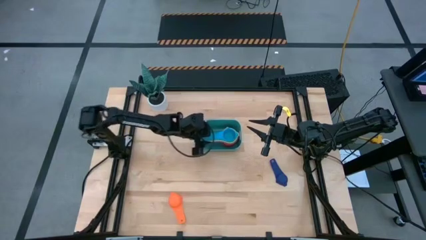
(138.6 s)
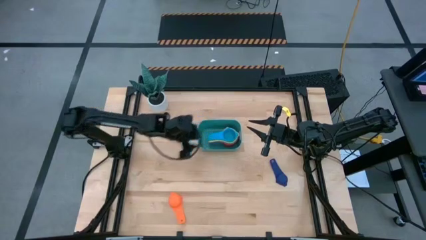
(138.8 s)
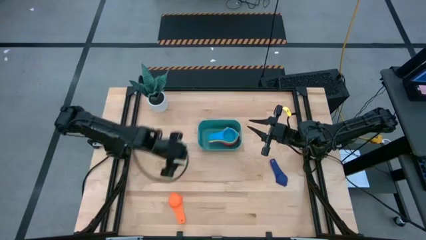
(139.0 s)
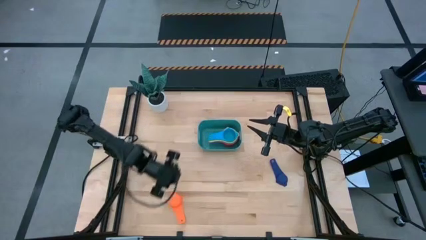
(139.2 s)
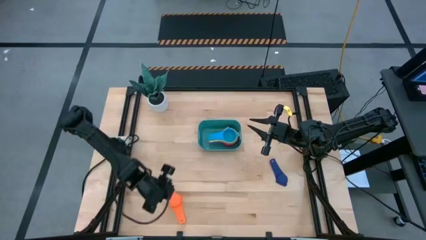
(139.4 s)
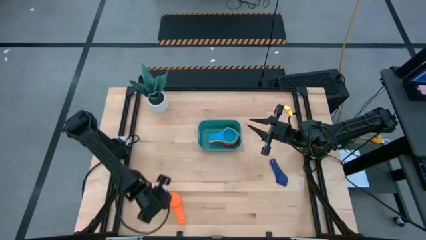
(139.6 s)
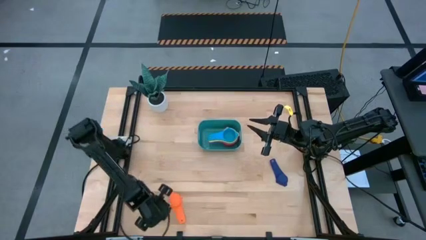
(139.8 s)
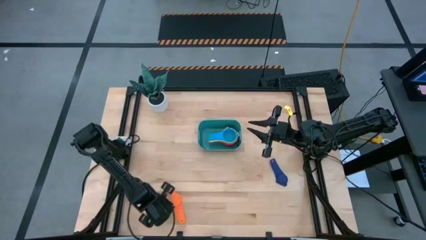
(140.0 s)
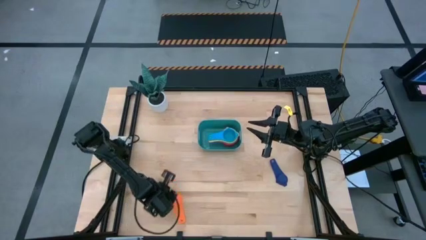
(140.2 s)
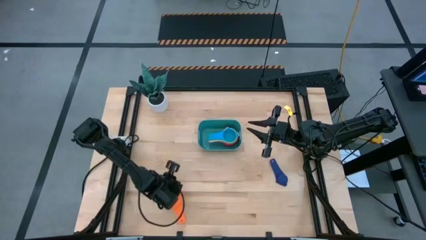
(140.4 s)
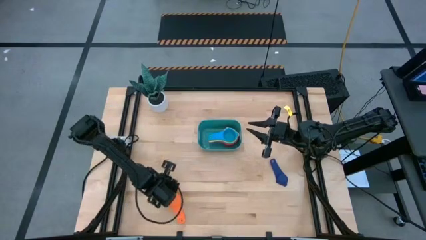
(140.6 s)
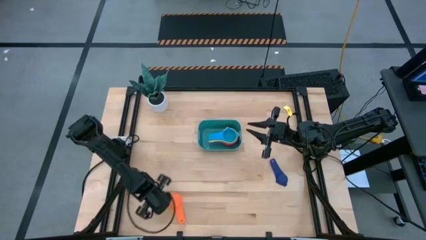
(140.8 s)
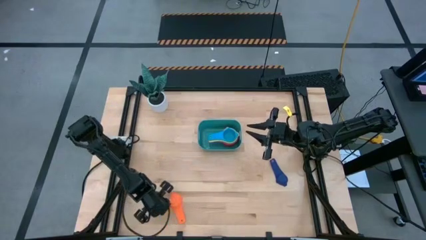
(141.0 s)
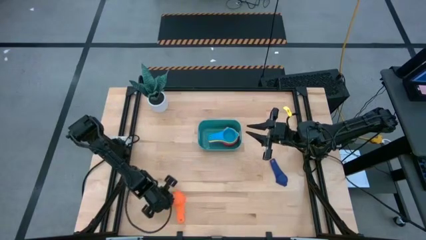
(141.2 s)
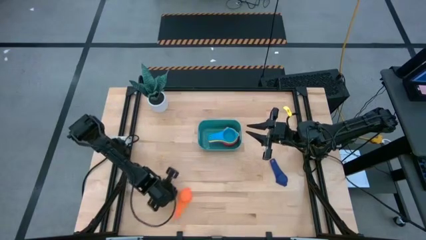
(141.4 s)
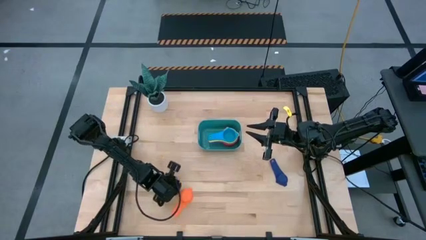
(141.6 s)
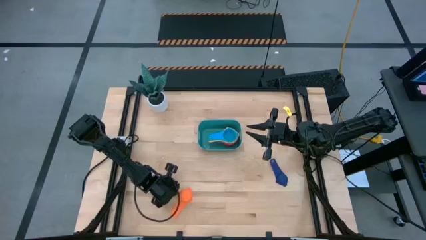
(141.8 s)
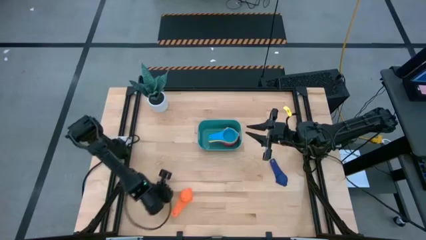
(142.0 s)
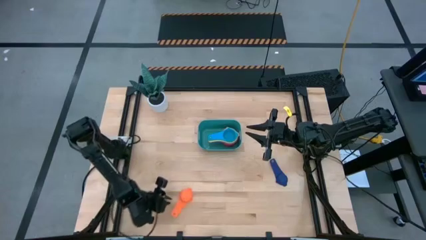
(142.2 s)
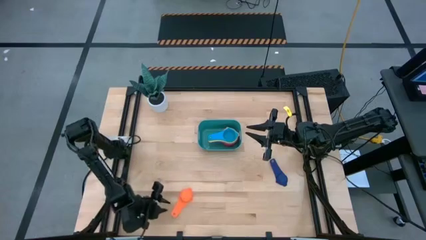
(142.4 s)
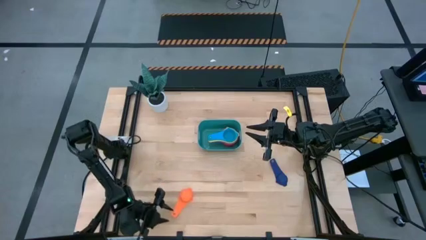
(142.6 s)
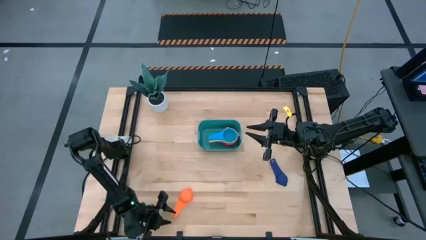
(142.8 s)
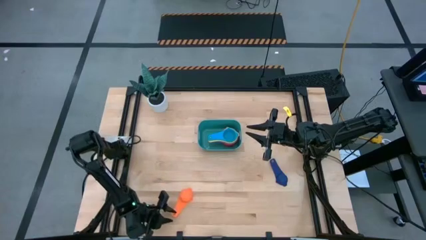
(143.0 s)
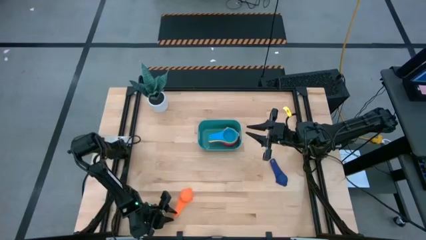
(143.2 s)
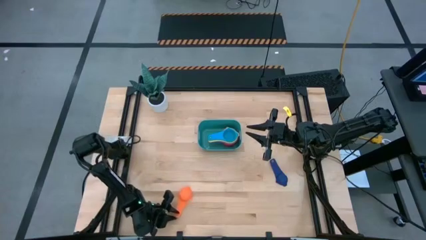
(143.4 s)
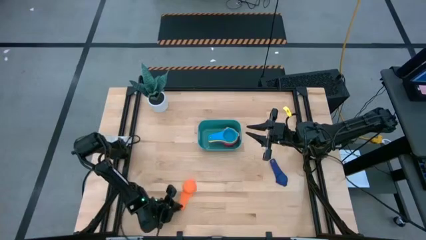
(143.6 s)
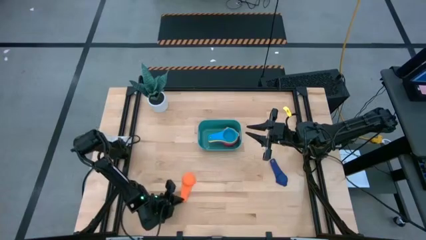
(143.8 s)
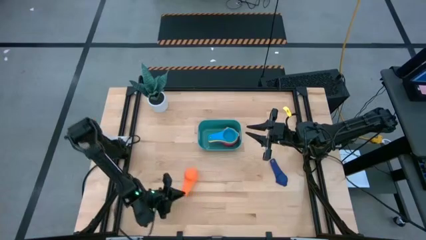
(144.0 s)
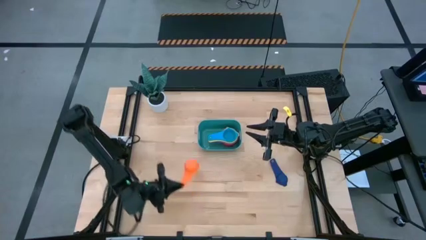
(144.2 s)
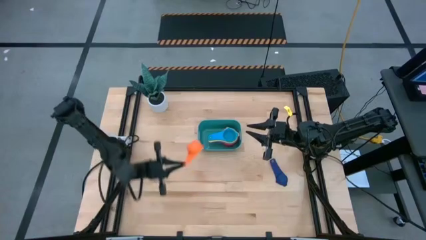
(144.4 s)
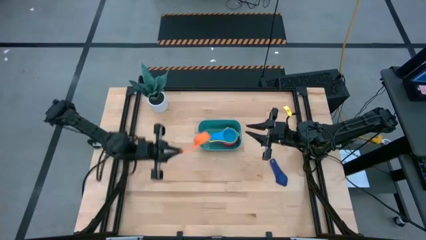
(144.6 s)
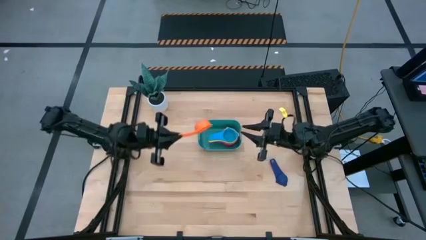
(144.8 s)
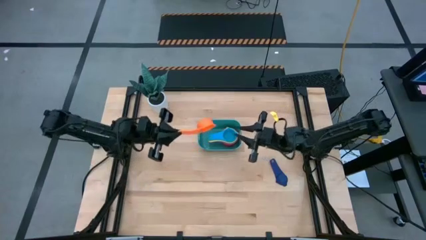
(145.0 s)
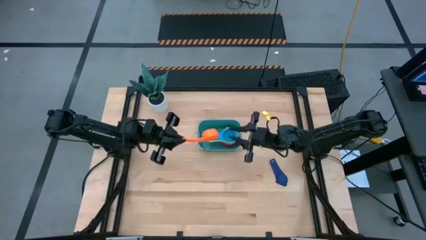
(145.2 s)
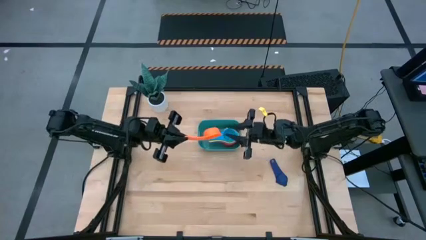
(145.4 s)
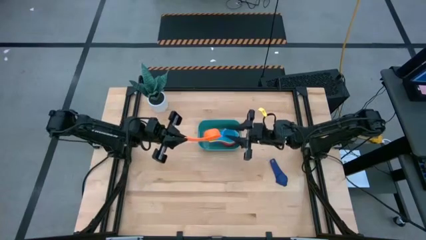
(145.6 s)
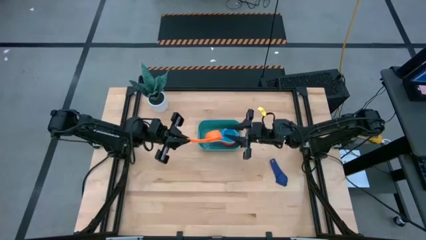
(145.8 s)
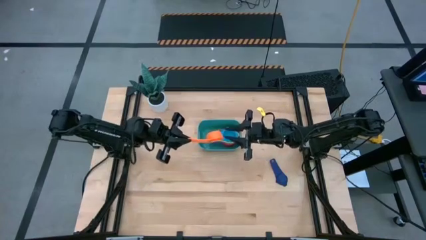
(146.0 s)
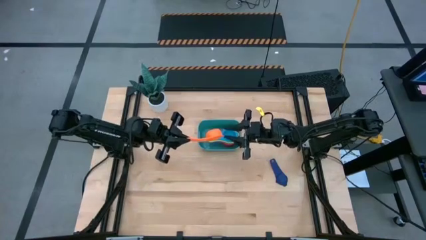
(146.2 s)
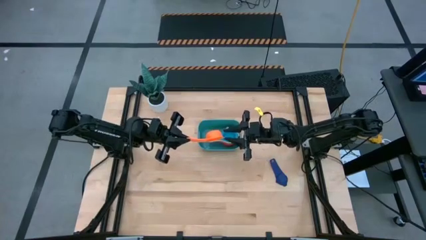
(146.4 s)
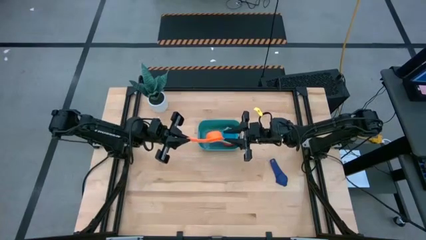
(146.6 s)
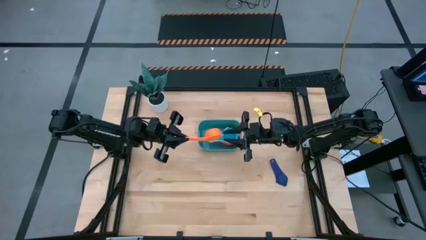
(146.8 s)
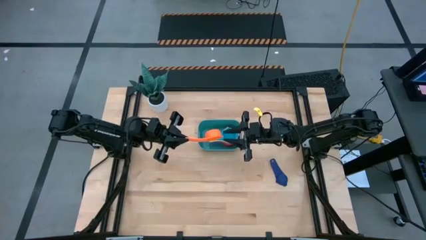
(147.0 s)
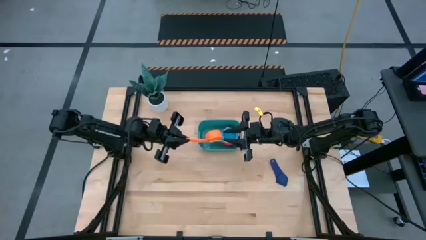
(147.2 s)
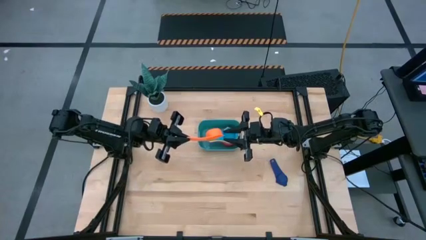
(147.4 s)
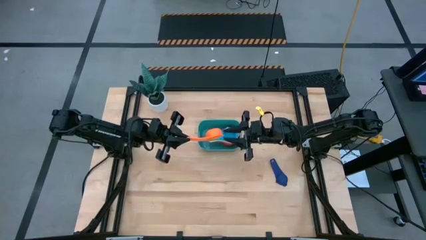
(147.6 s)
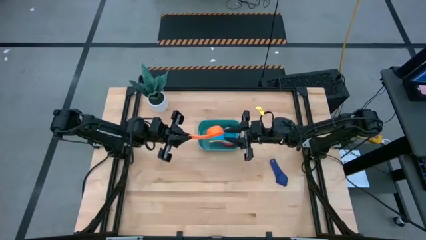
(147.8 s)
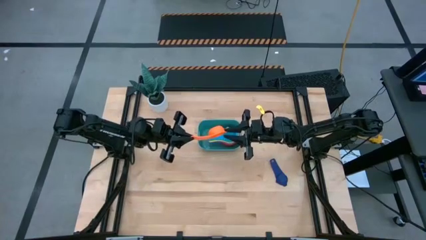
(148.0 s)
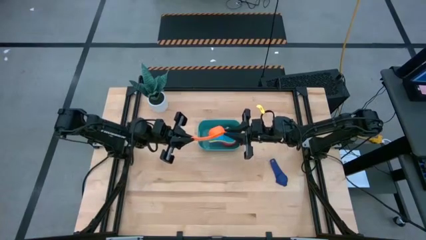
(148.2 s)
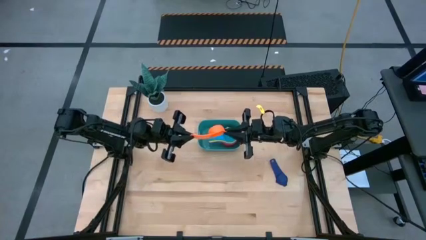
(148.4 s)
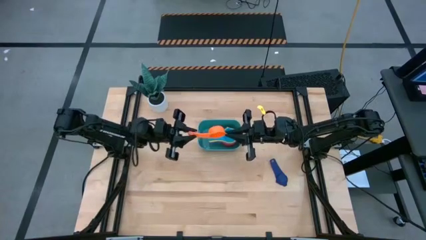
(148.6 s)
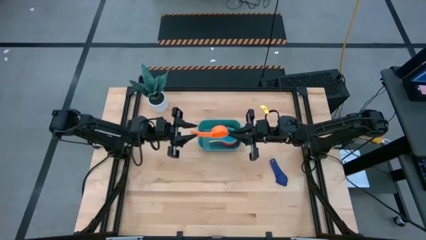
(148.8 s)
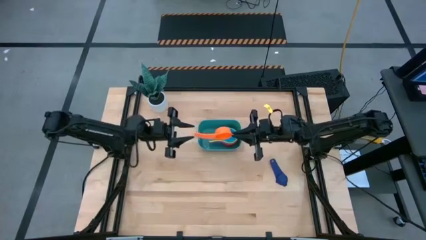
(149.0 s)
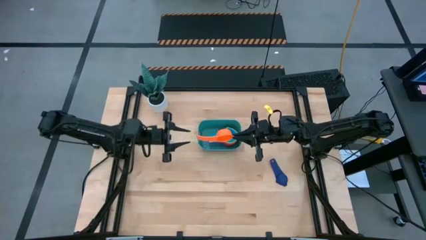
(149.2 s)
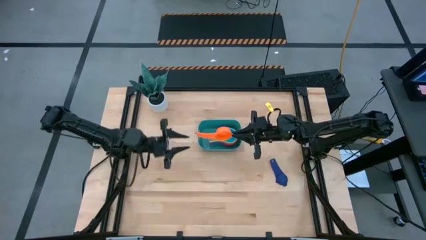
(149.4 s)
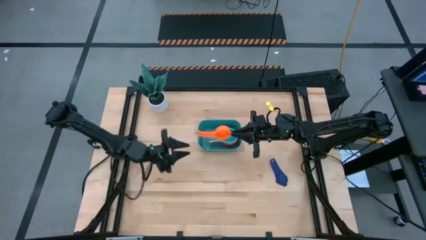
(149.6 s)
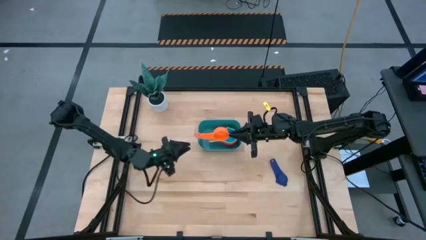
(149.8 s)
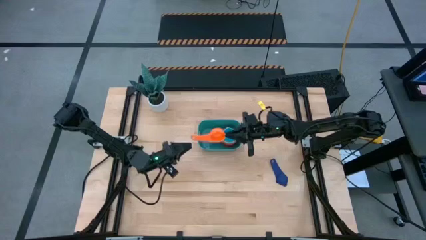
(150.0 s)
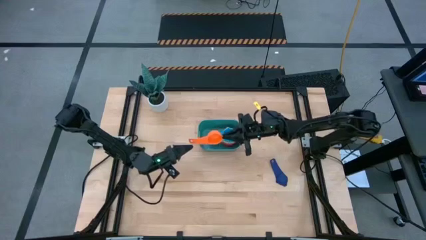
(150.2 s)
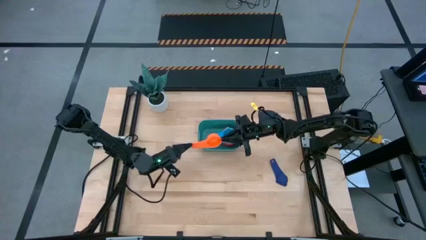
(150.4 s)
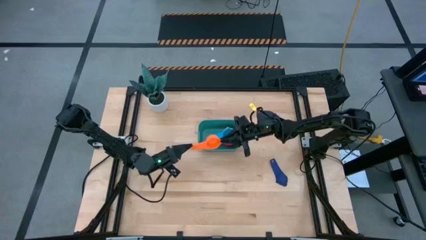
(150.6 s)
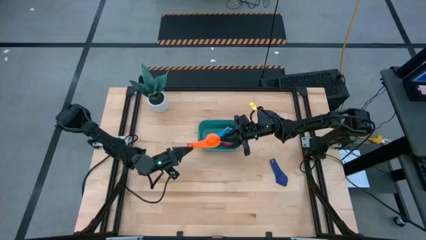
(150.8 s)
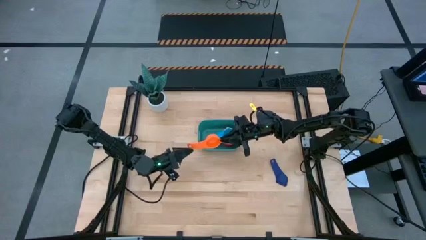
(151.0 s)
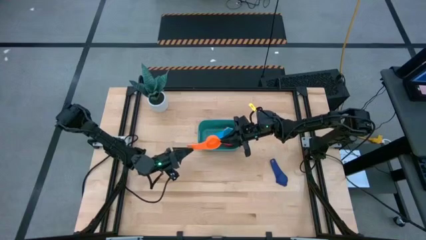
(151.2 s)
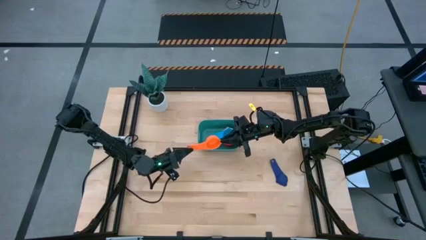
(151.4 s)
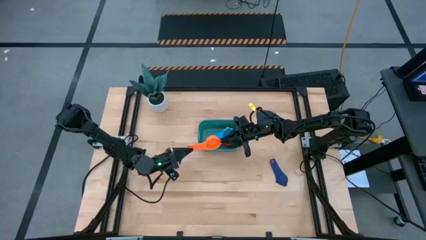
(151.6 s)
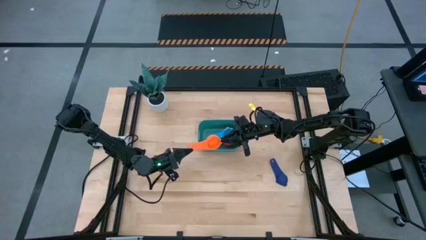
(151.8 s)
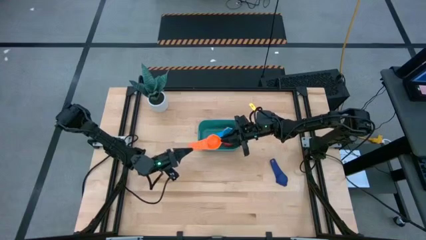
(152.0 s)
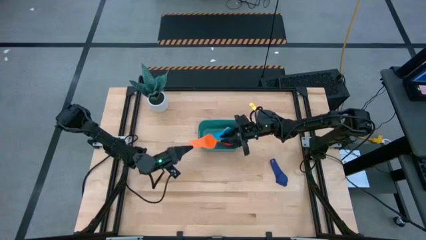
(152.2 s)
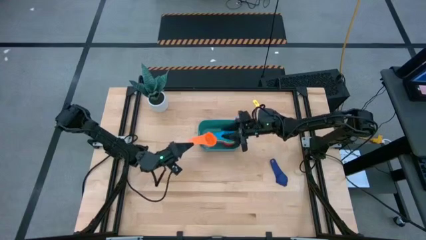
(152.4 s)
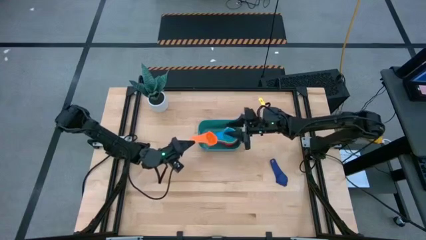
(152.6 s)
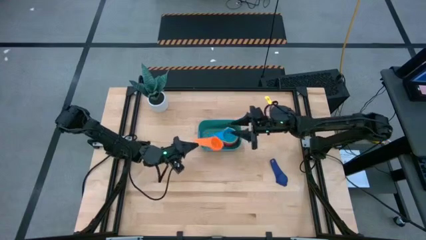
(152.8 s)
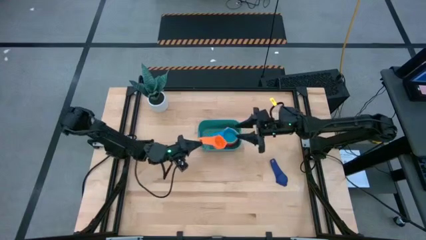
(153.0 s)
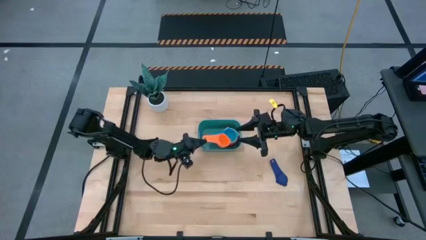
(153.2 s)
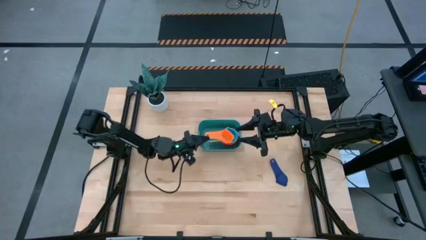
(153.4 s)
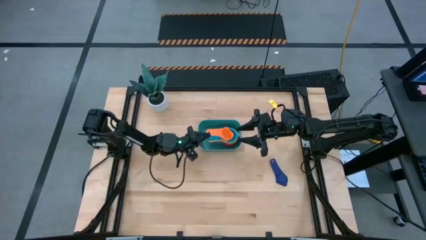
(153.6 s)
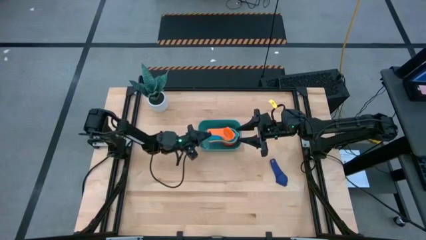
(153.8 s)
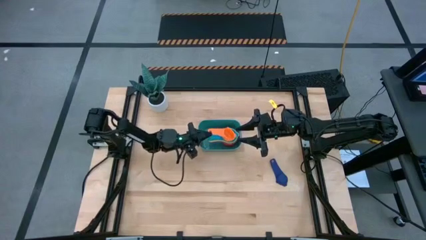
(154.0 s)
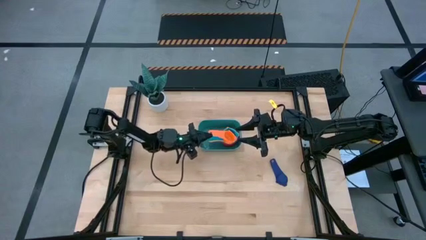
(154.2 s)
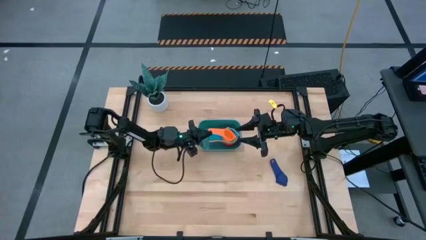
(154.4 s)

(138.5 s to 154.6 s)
Task: Nest measuring cups in basket
Stack the orange measuring cup on top of the light blue measuring cup inside the light blue bin

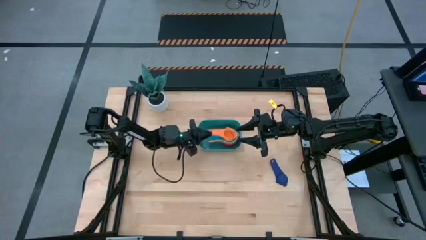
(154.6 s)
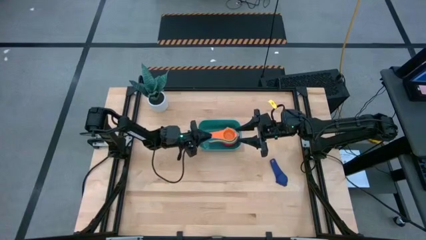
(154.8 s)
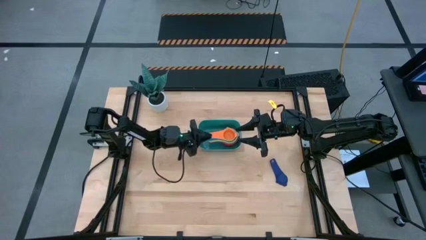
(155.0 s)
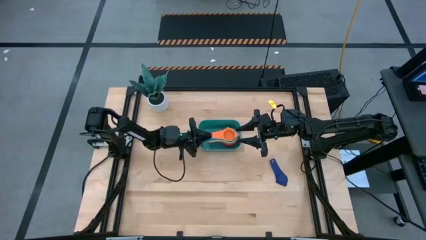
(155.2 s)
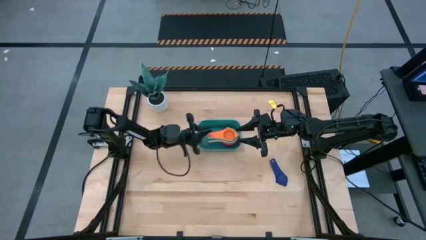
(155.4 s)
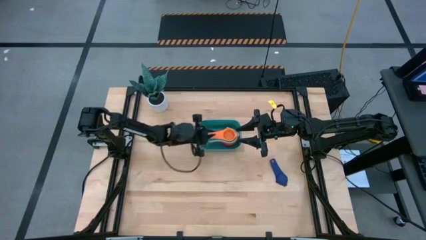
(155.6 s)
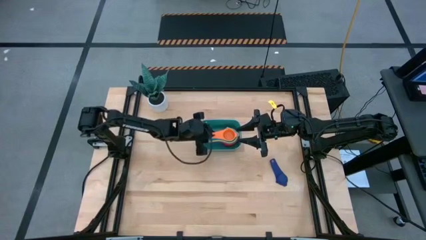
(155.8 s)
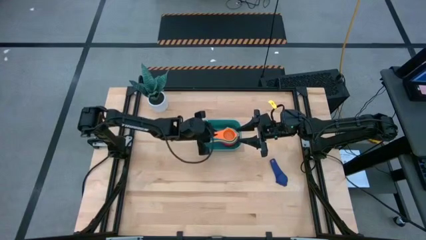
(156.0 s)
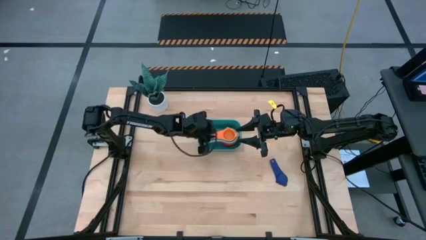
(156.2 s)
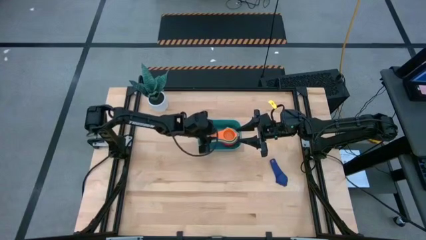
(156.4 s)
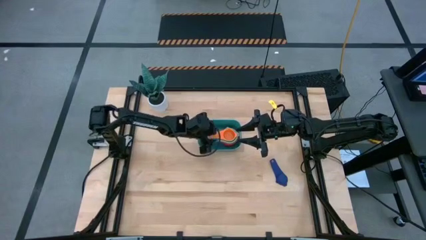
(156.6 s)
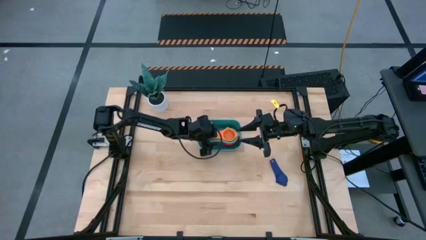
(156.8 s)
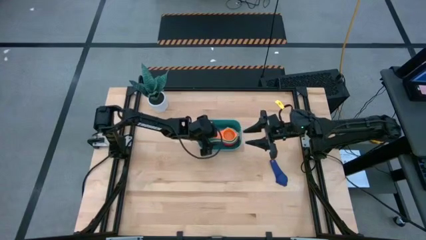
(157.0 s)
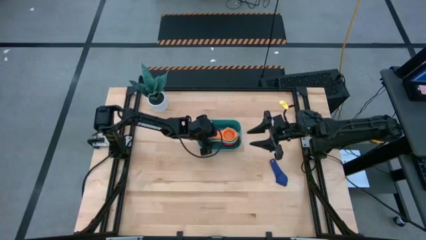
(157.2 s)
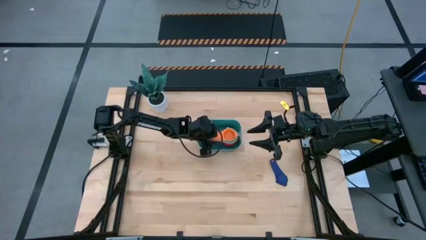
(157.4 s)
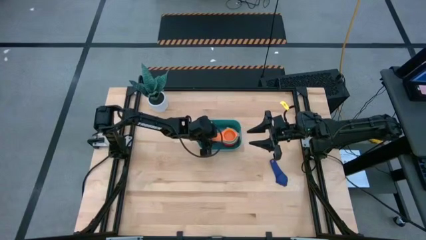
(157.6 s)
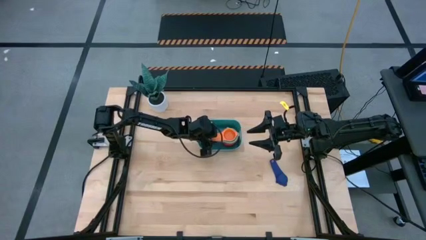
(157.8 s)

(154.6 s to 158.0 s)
Adjust the stack of measuring cups inside the light blue bin
